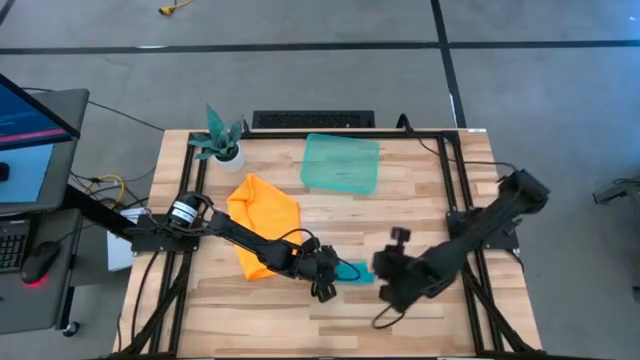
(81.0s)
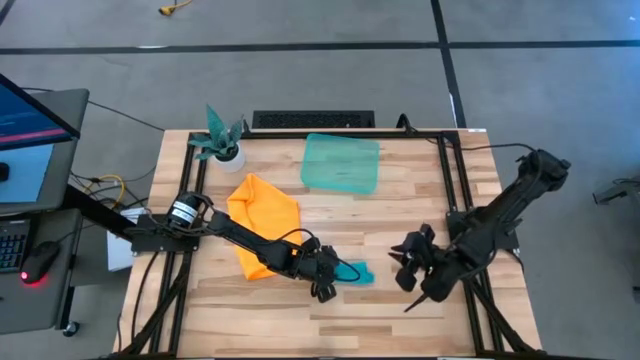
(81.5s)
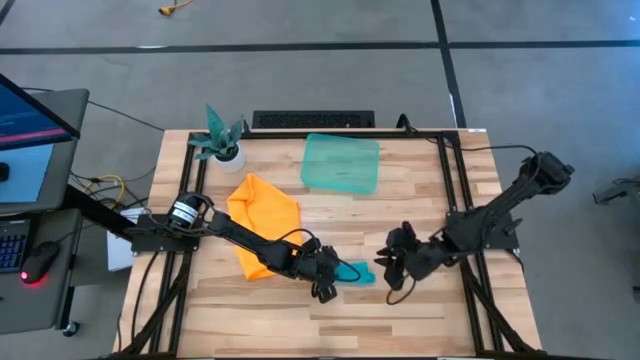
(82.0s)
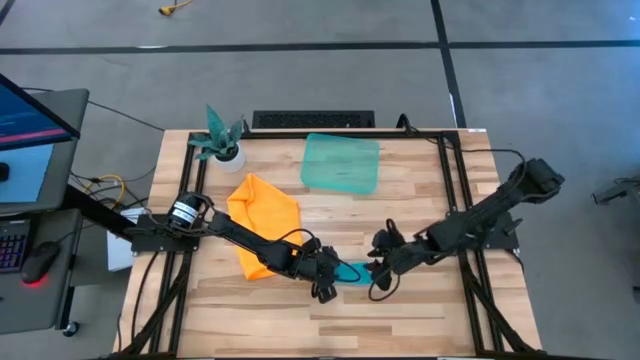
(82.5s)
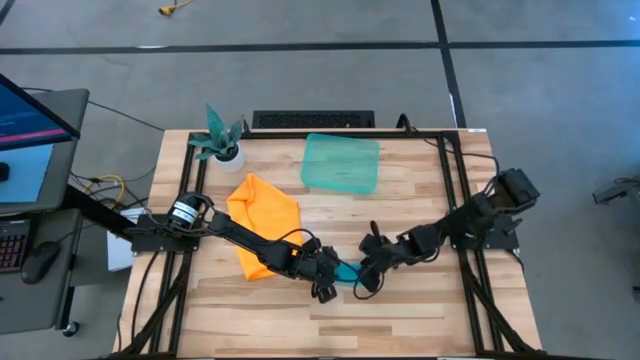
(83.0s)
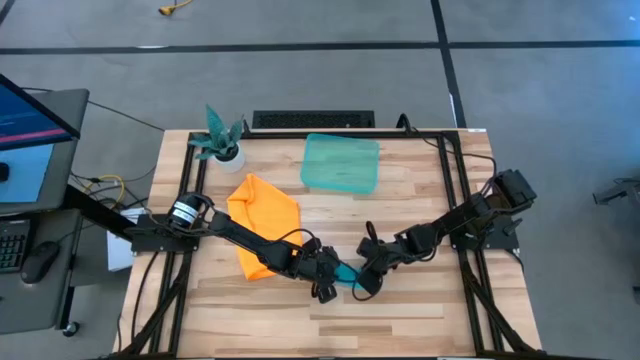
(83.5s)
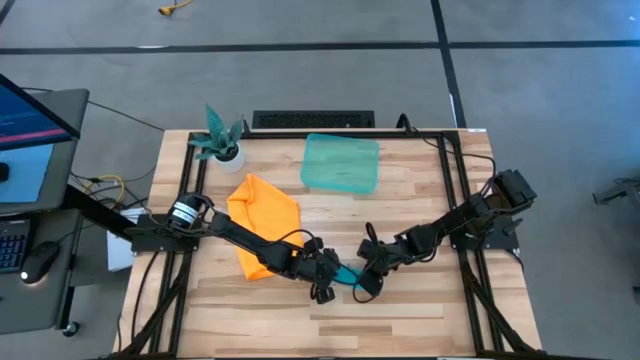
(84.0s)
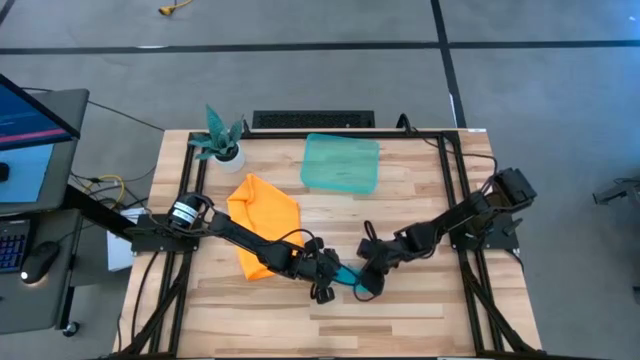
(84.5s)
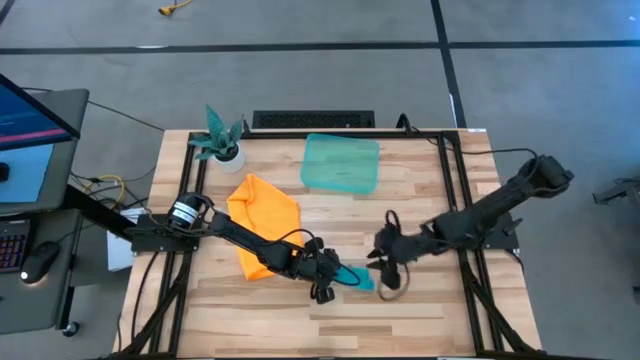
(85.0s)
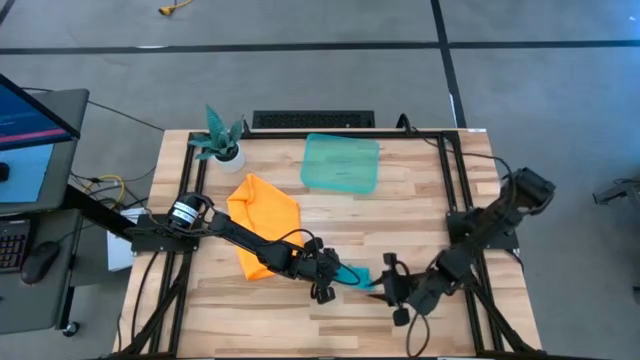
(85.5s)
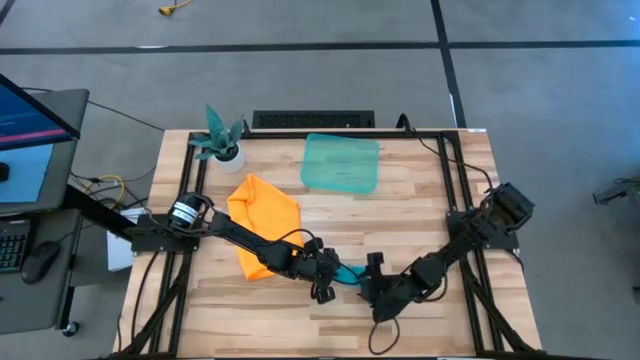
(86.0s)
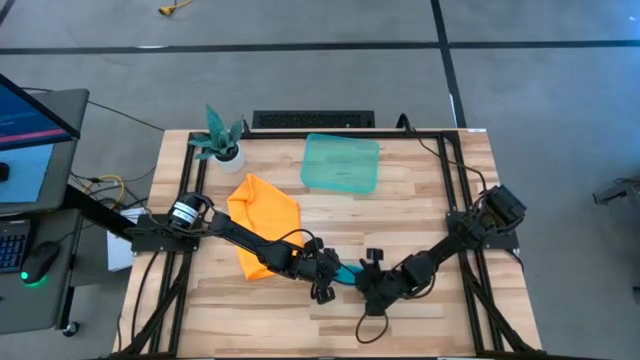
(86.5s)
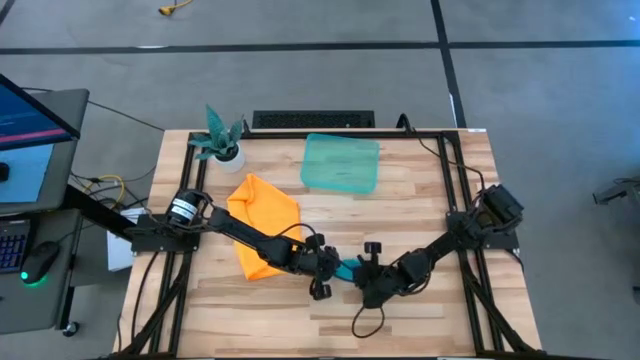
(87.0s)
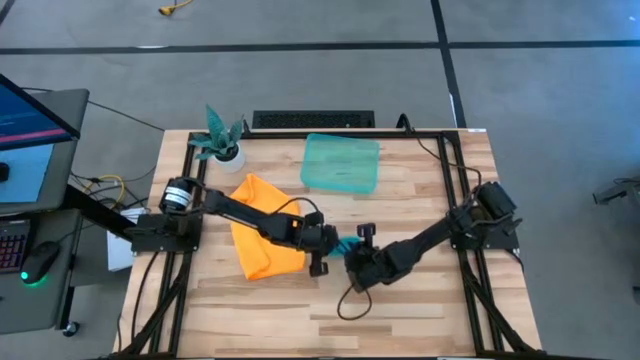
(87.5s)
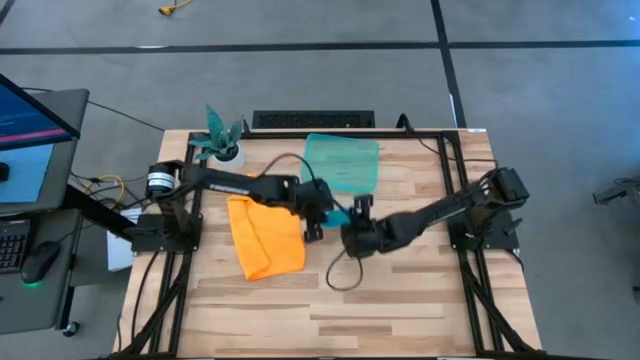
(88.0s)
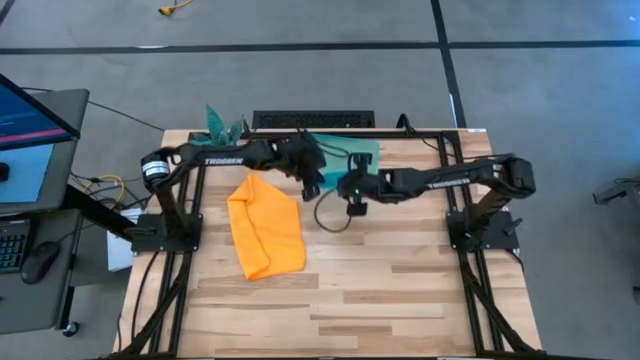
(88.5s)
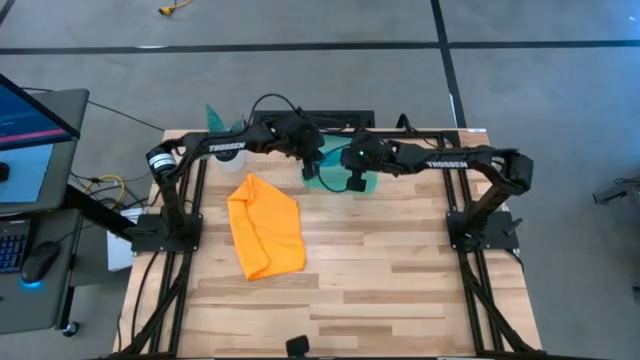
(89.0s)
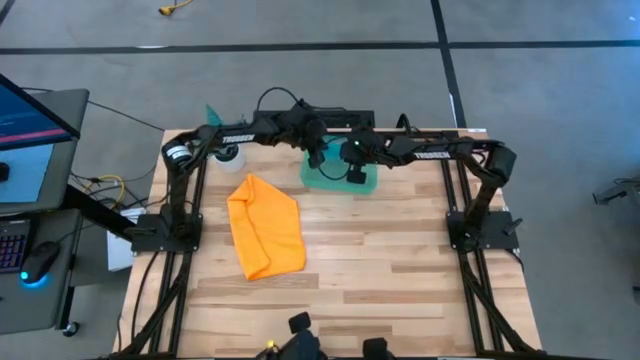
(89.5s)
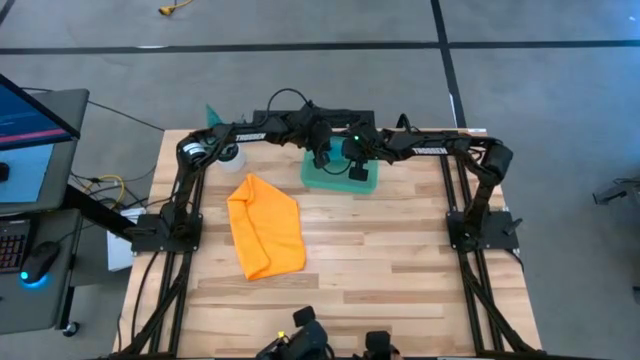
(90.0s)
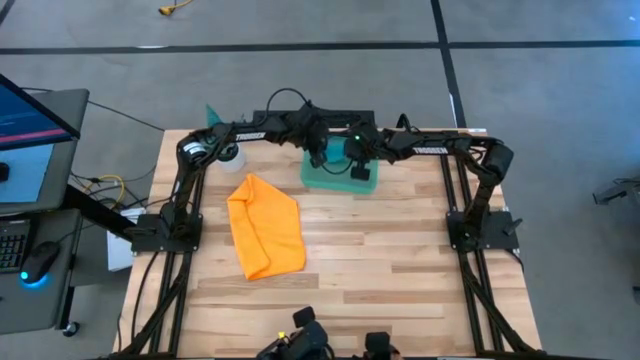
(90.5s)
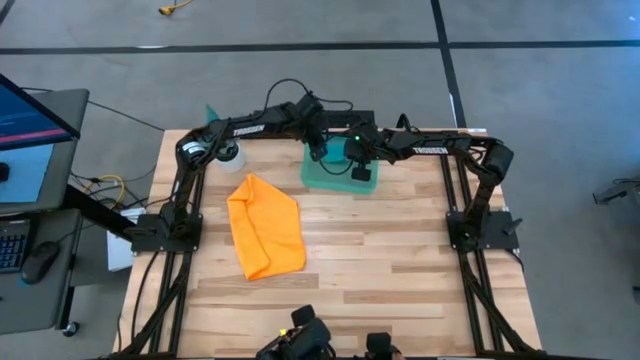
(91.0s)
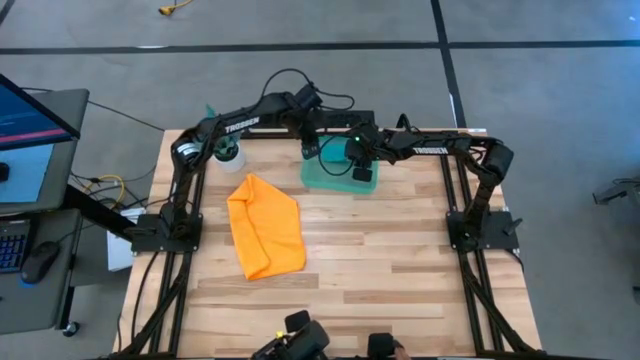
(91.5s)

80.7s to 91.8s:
Task: Roll microfiber towels into tight, uniform cylinder then place into a basket
Put the rolled blue microfiber towel into the green bin

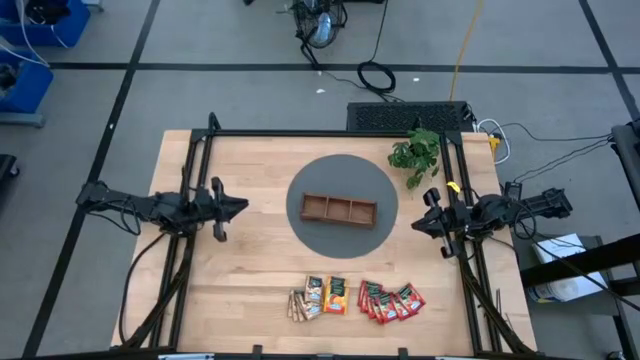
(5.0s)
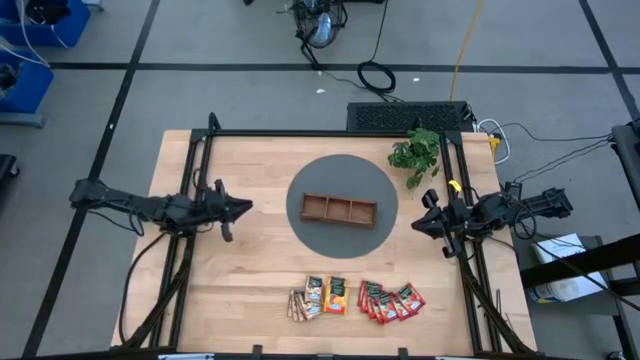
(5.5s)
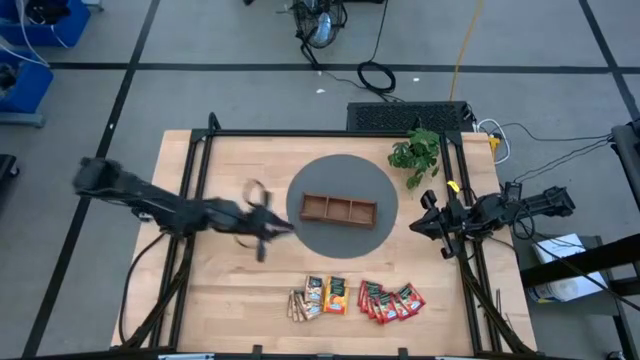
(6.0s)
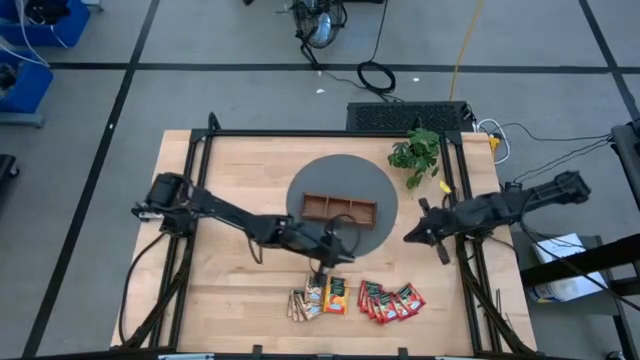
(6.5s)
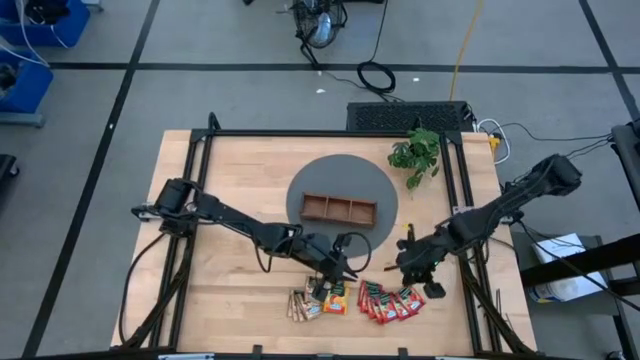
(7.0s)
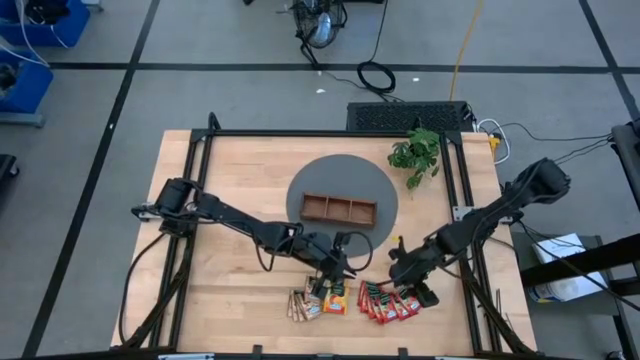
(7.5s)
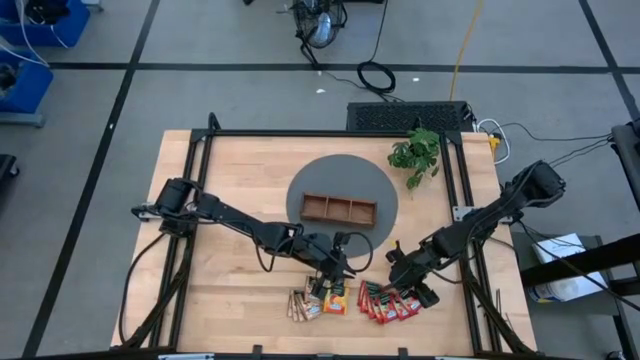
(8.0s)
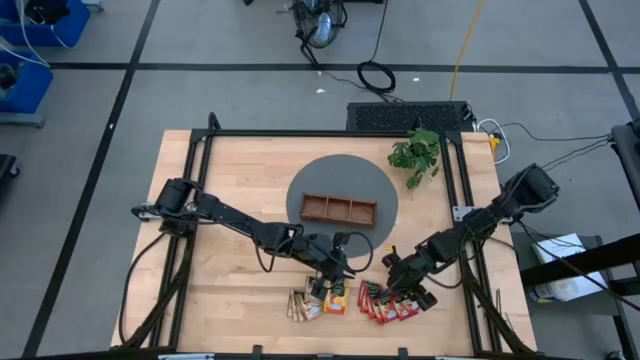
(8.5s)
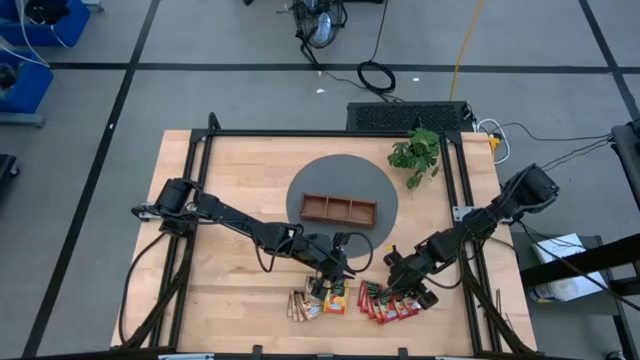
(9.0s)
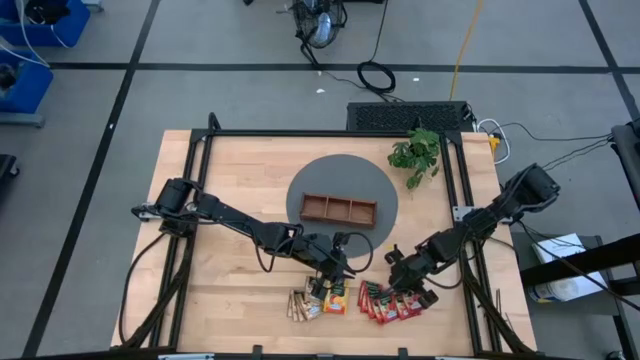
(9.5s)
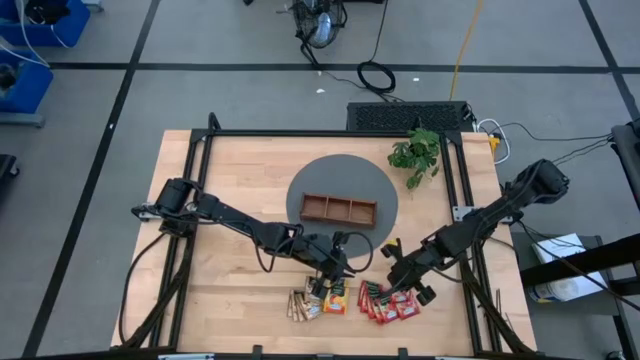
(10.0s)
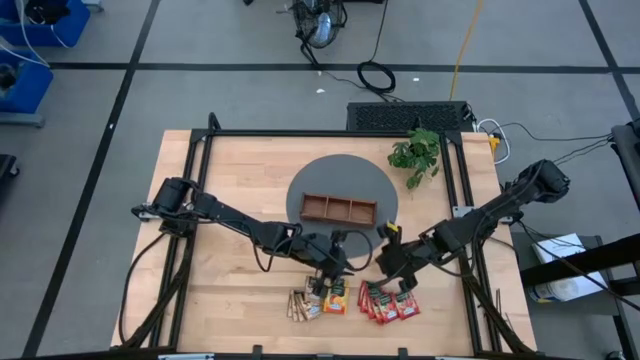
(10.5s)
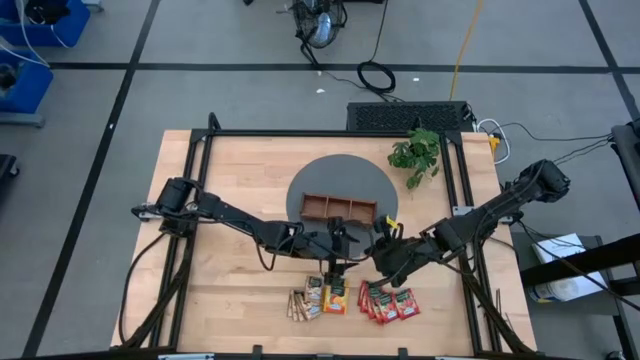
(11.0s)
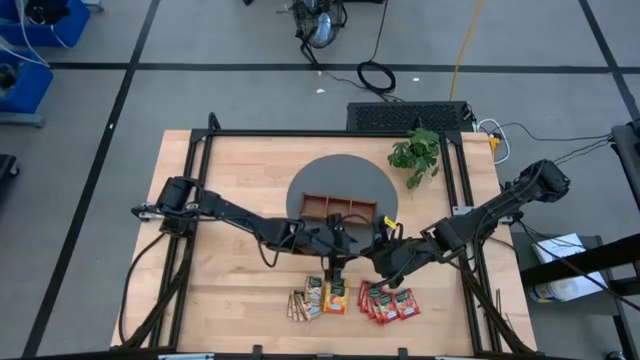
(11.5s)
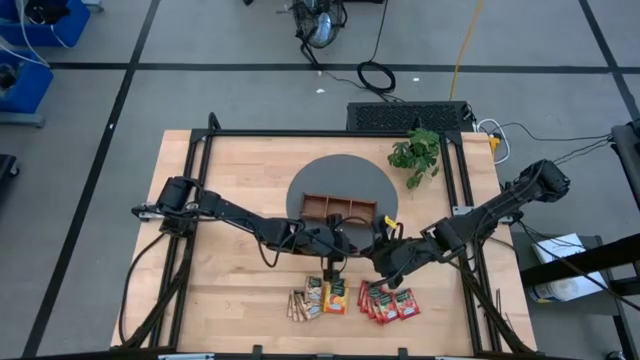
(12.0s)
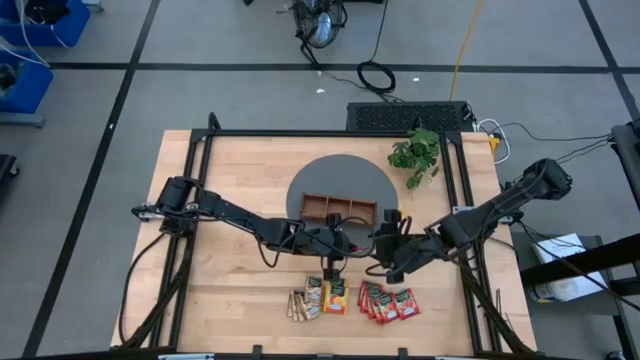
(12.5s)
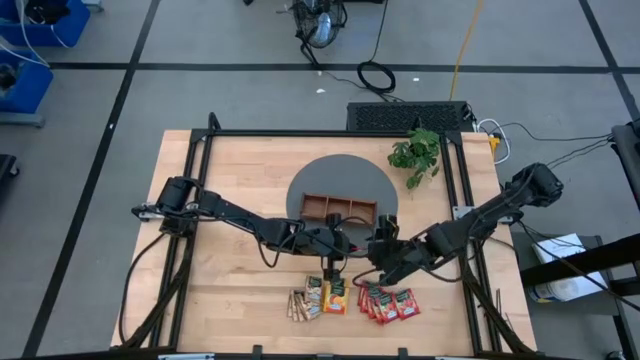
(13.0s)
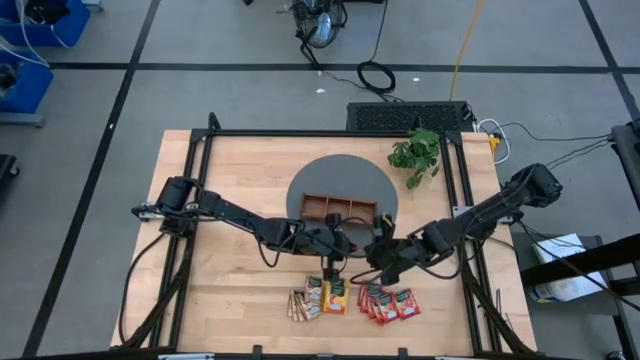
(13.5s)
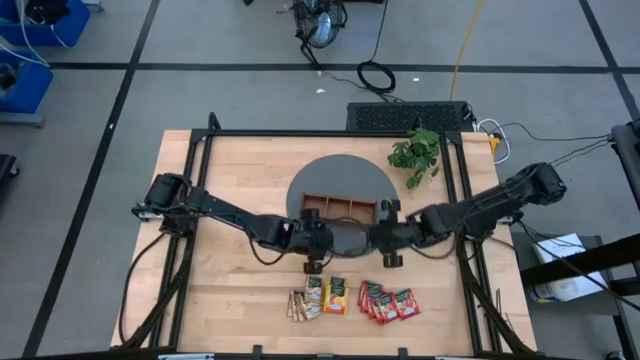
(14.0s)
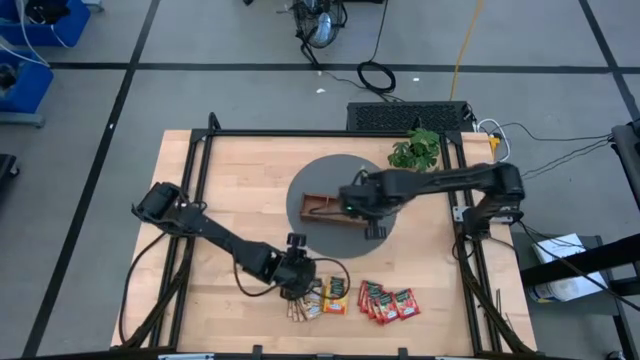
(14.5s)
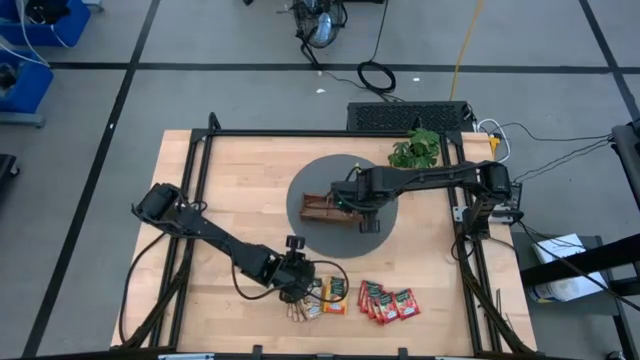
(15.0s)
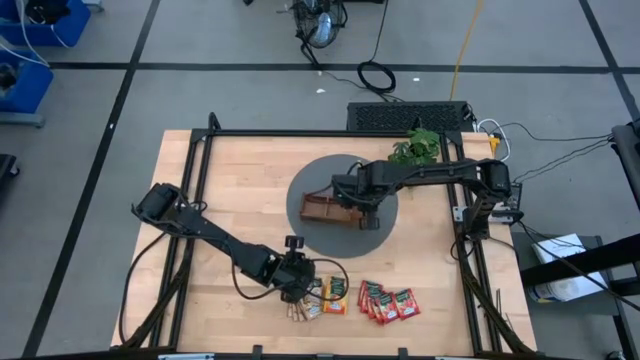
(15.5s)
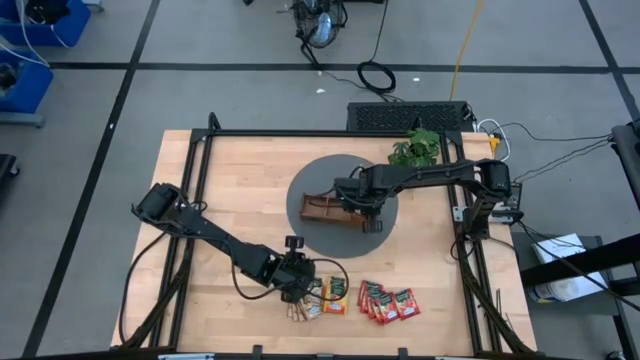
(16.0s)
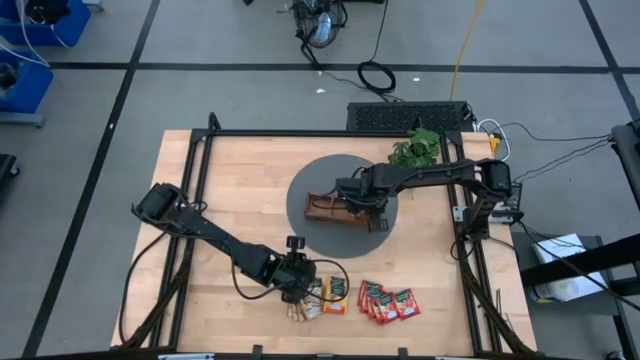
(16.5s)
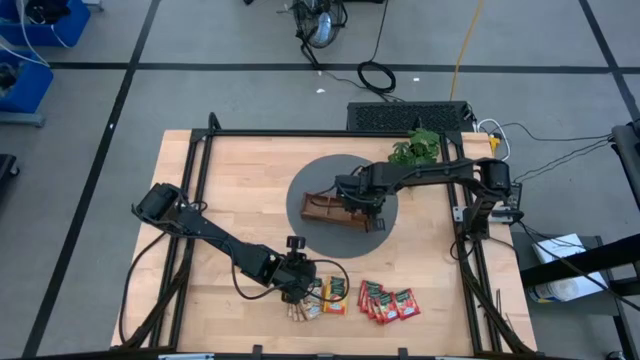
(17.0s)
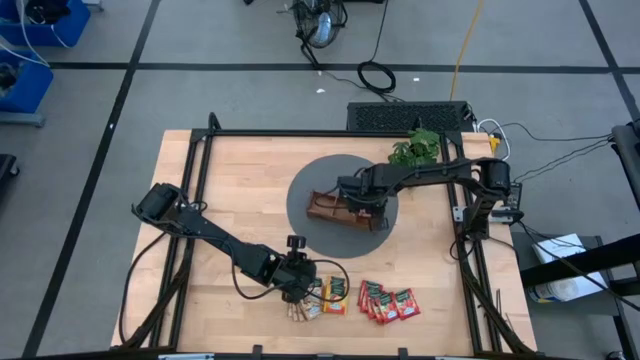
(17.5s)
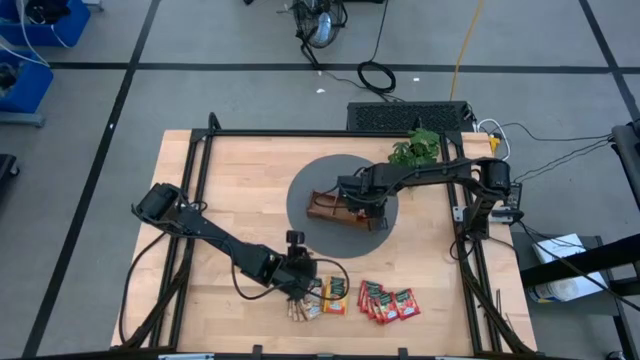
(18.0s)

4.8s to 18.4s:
Task: Pick & Place Tea
Put the red tea bag to the right section into the wooden organizer
